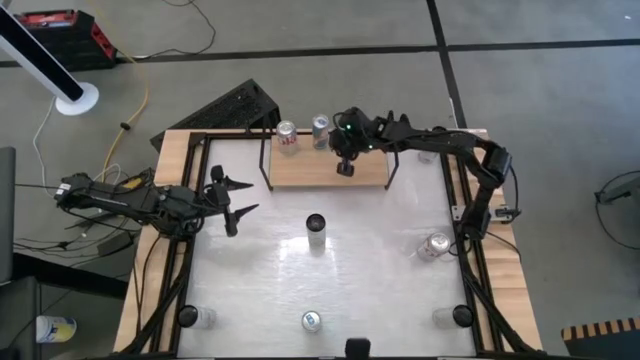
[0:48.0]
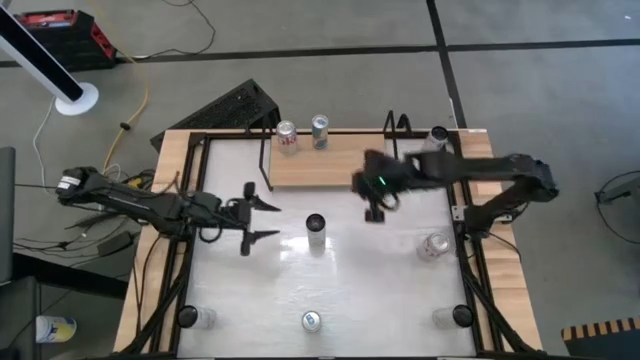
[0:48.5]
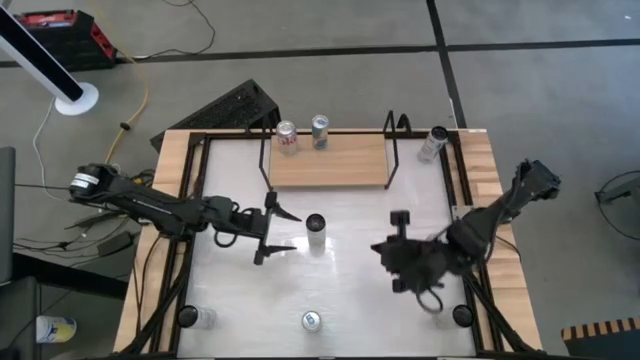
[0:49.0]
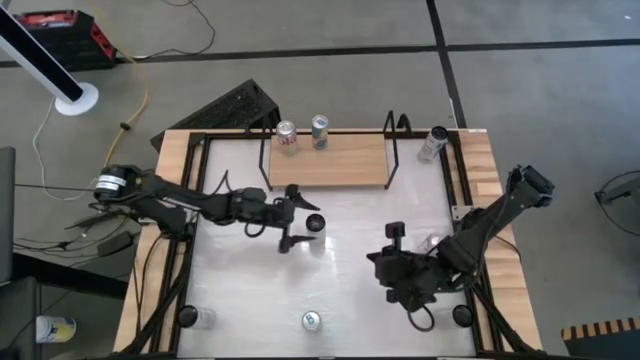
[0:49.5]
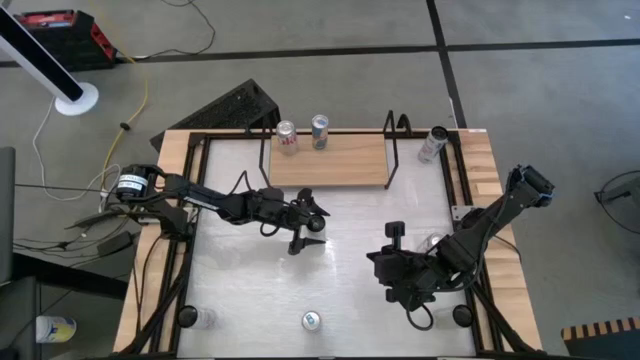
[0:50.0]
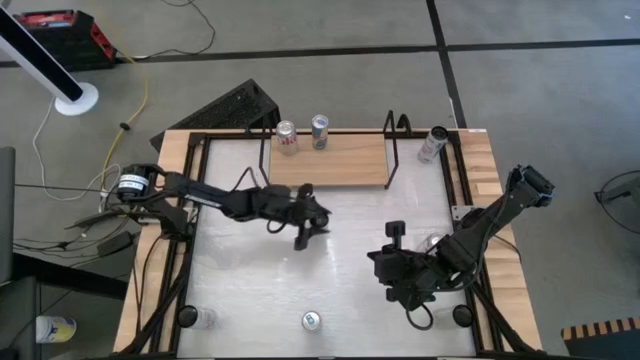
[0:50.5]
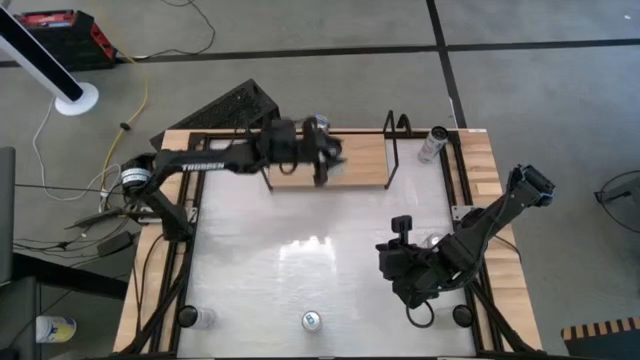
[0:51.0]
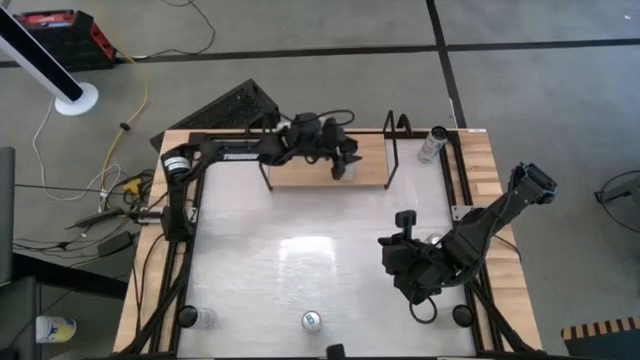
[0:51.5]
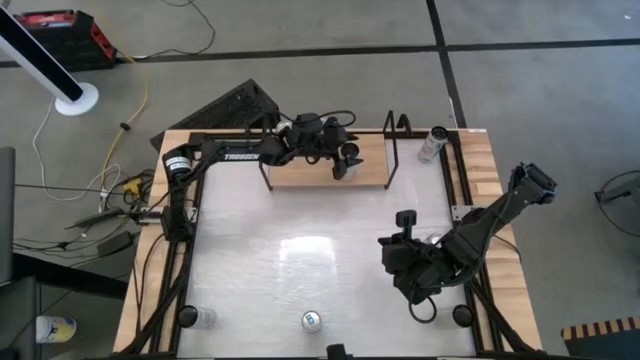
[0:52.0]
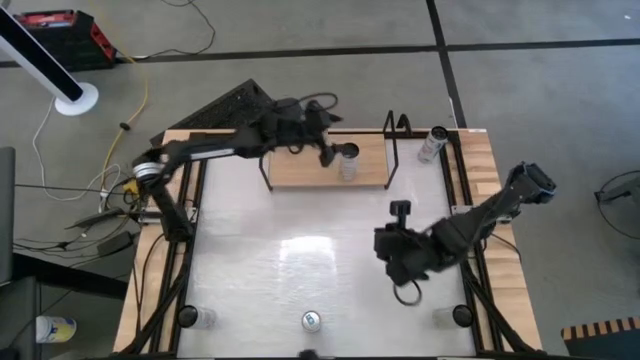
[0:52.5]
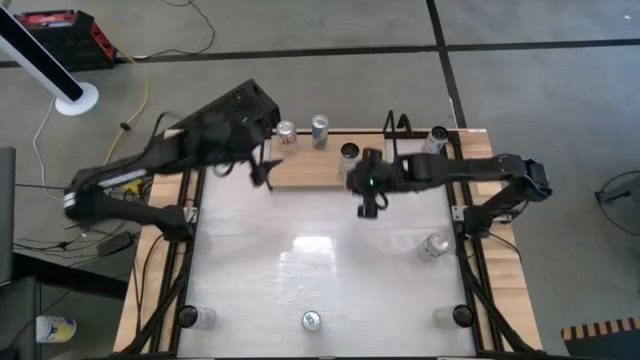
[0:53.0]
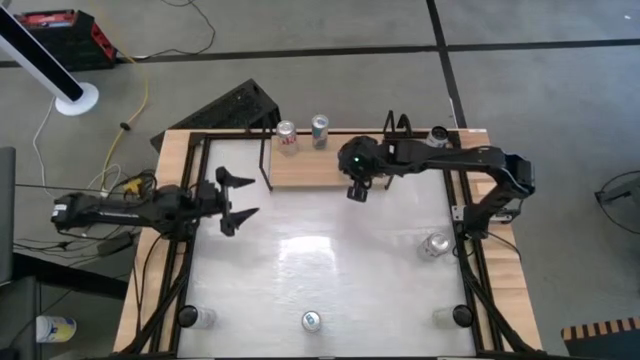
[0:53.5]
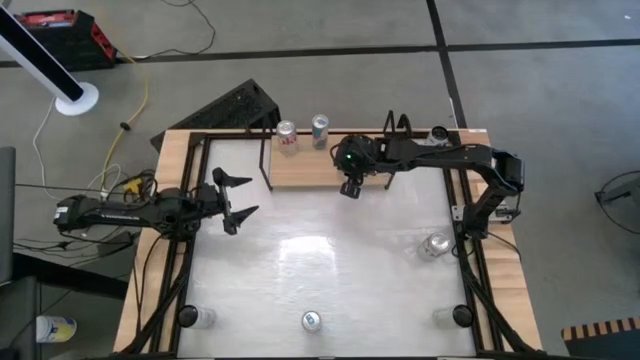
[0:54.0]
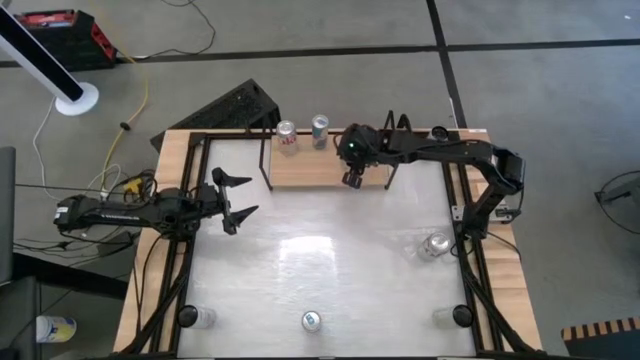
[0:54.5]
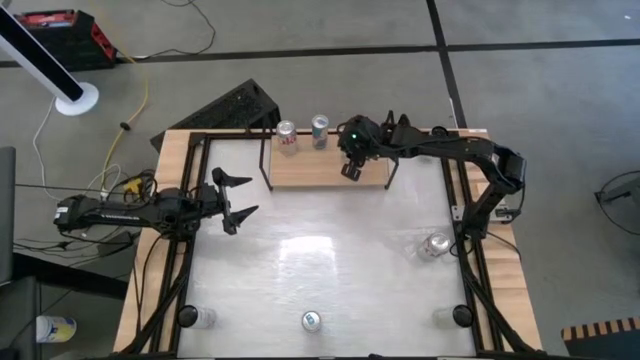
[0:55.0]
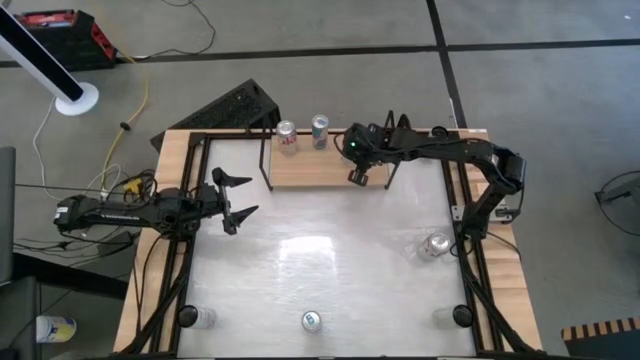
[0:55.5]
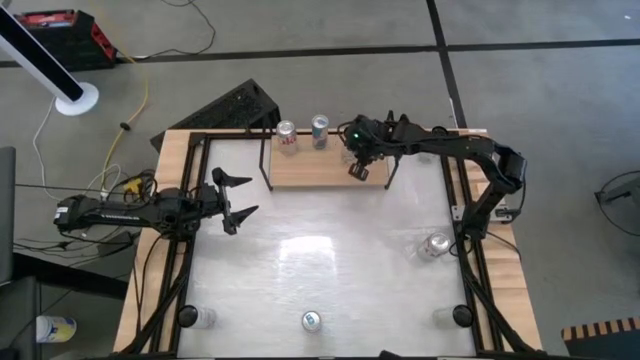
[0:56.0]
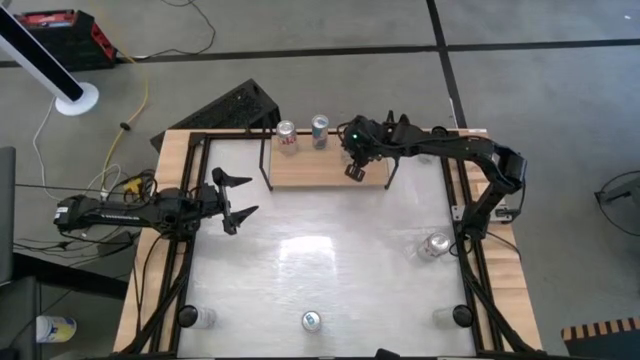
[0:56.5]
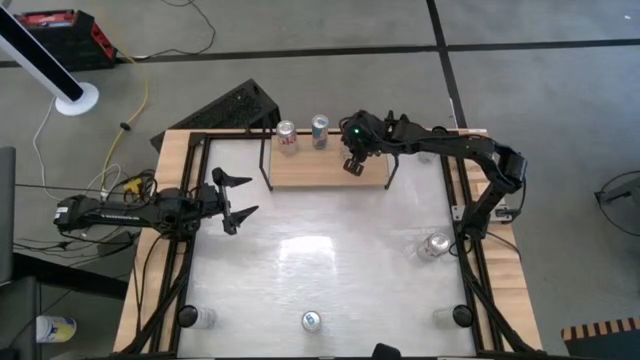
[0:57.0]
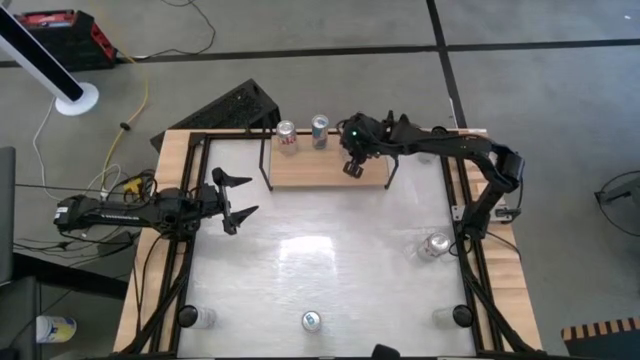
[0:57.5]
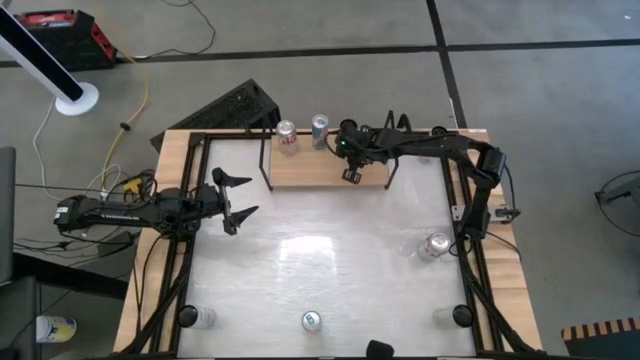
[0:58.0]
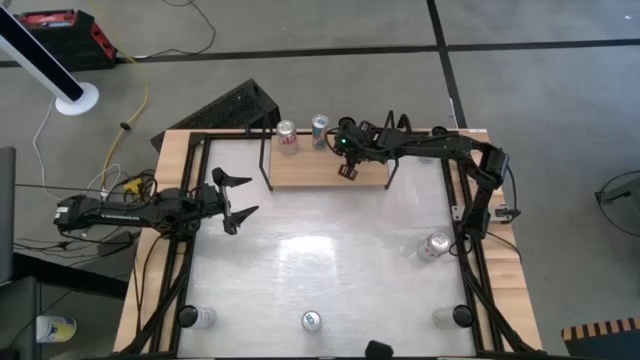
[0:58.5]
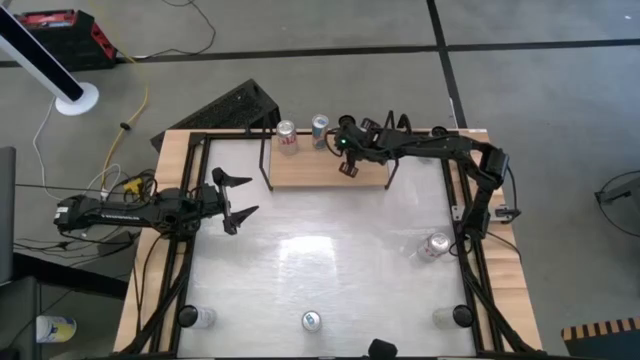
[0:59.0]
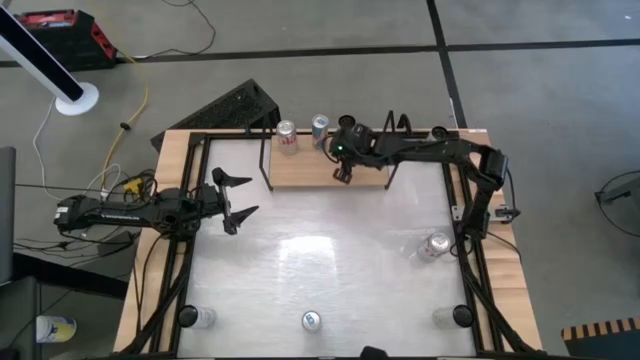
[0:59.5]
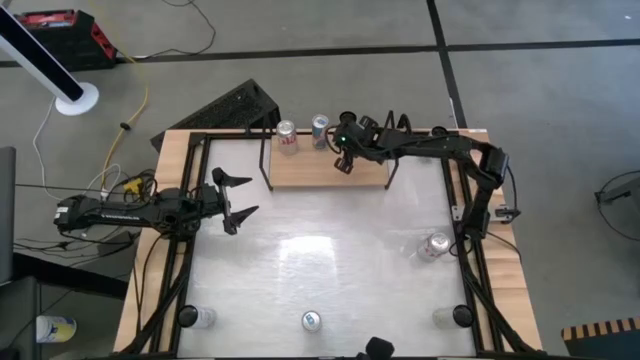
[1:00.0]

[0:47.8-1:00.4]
Task: Place canned beverage on shelf
Put the top white-yellow soda can on the shelf

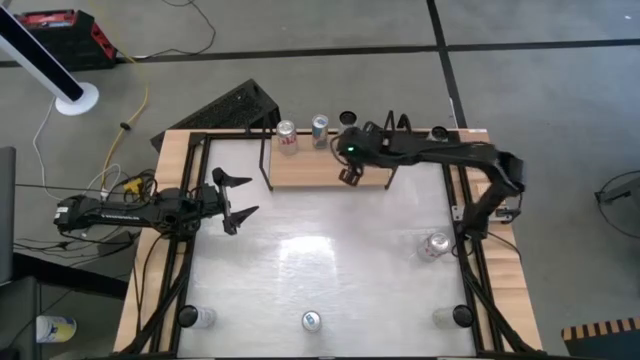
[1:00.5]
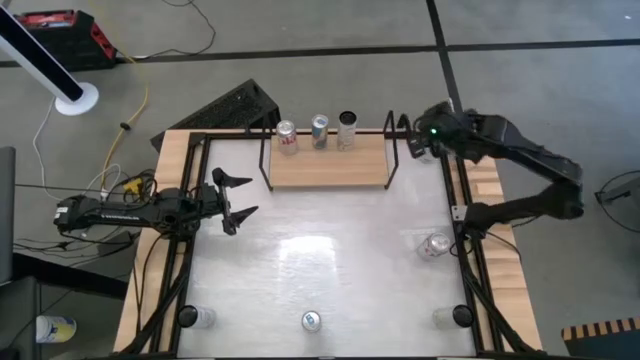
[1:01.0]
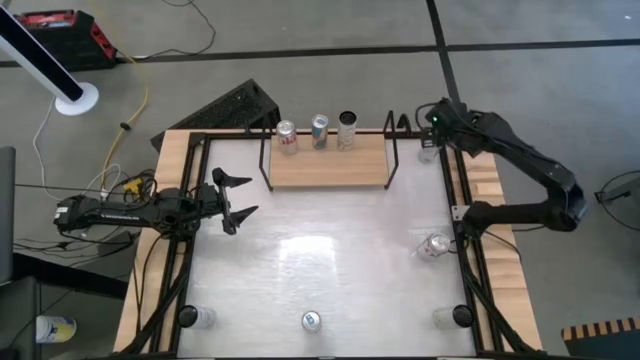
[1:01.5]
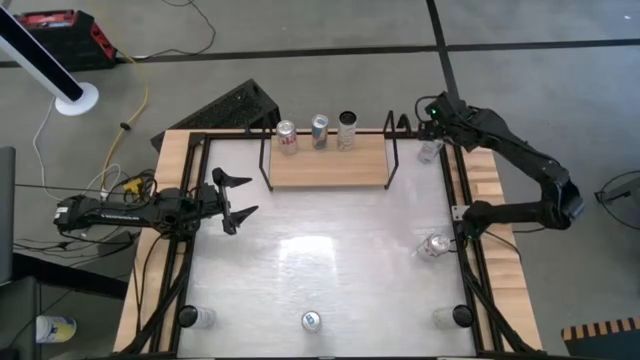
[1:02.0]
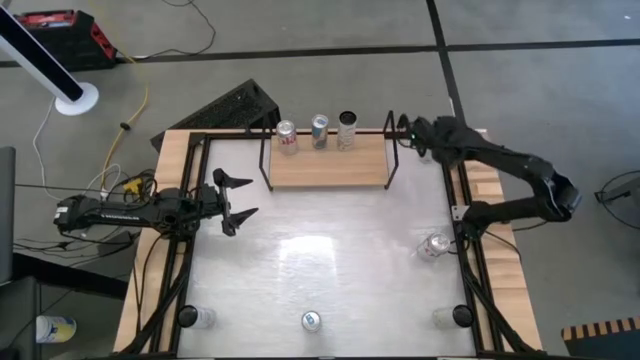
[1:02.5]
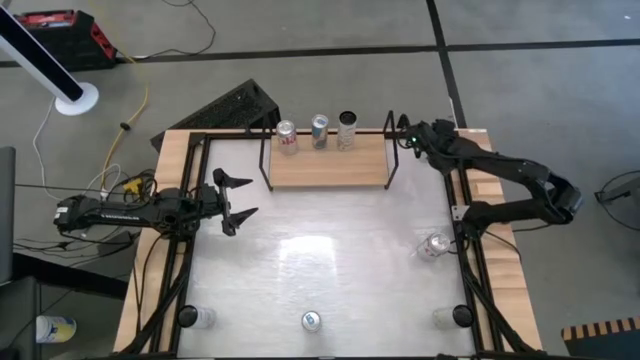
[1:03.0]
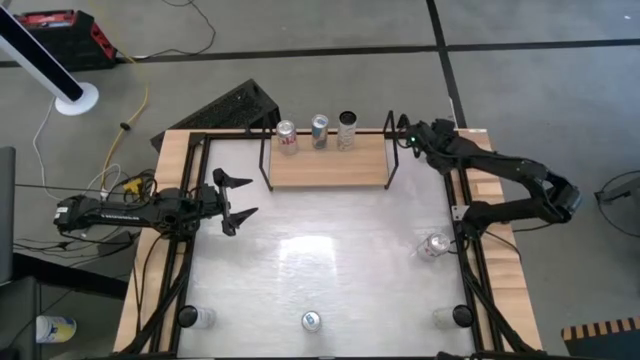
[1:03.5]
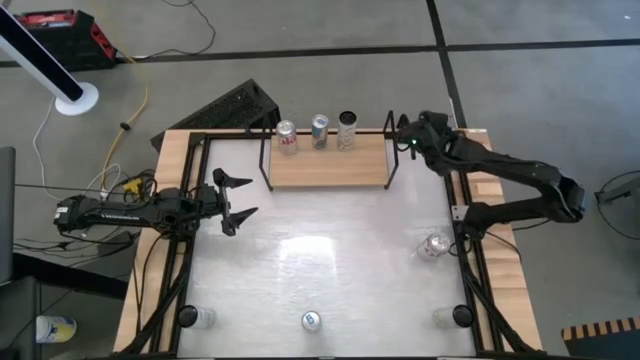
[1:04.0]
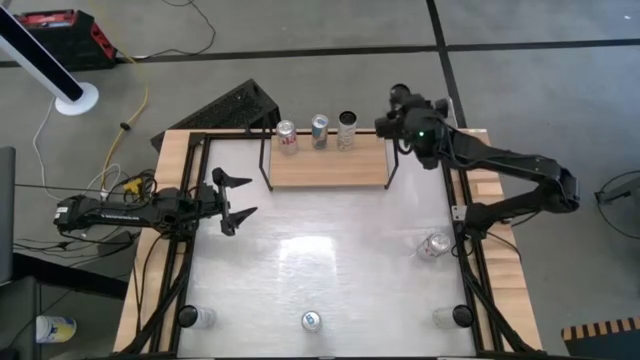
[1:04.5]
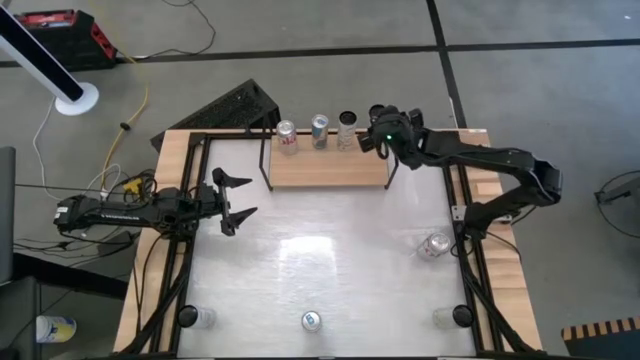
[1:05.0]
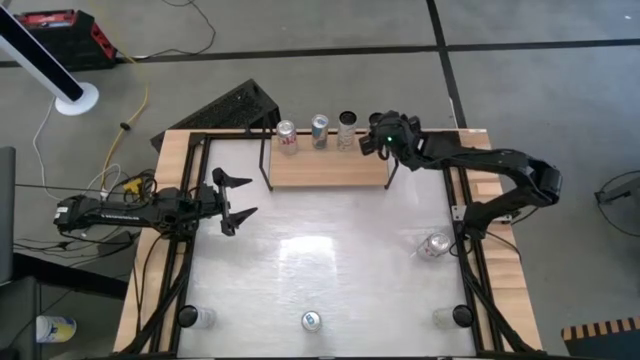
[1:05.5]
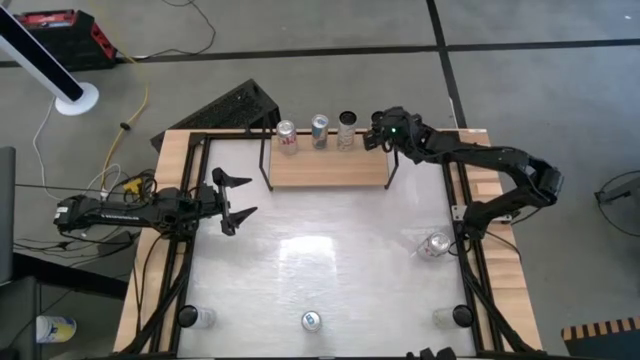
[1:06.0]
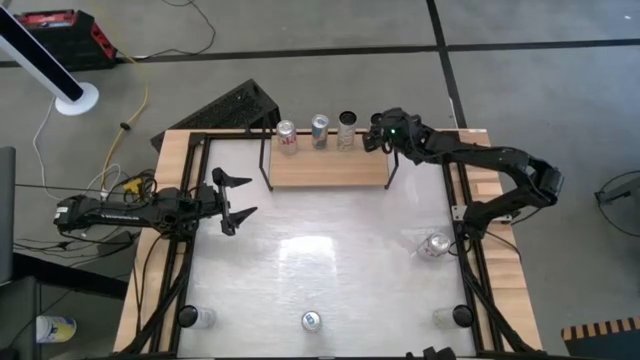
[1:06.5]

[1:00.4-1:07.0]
Put the top white-pink soda can on the shelf

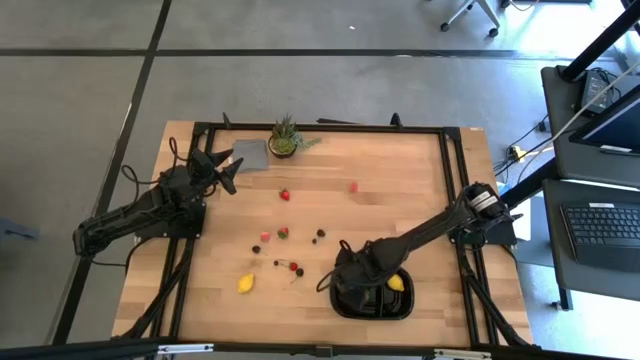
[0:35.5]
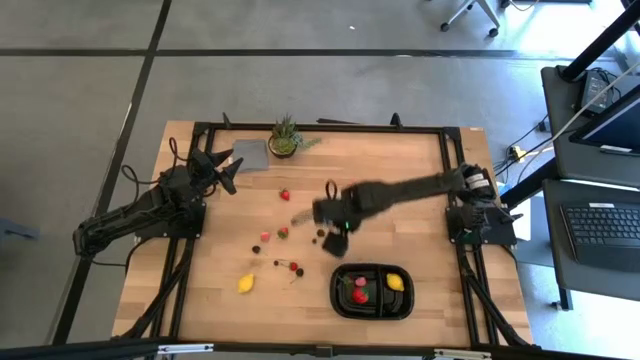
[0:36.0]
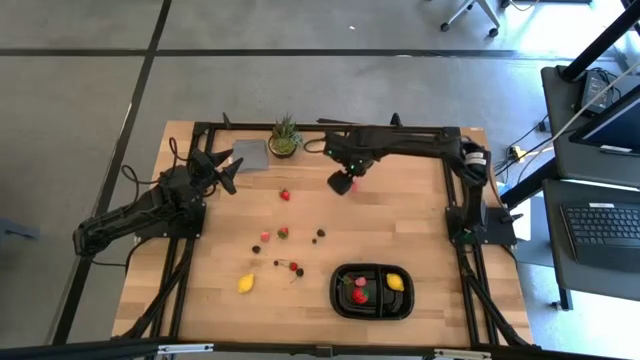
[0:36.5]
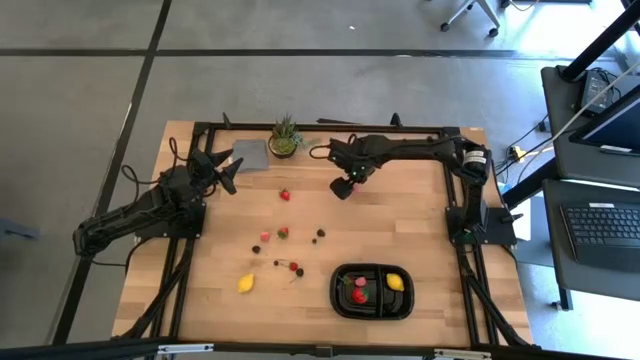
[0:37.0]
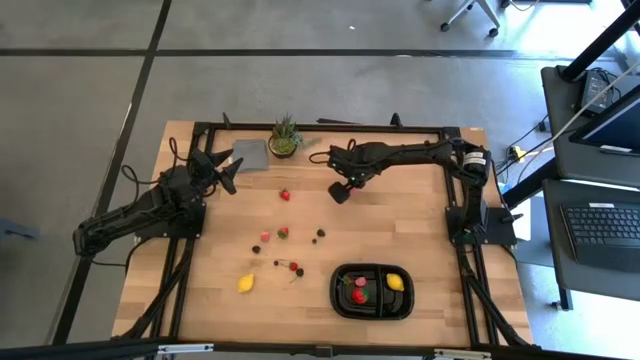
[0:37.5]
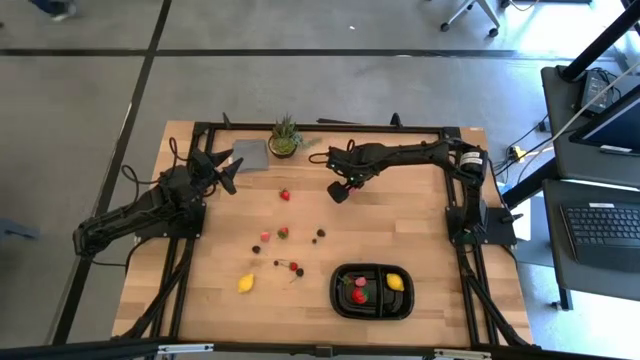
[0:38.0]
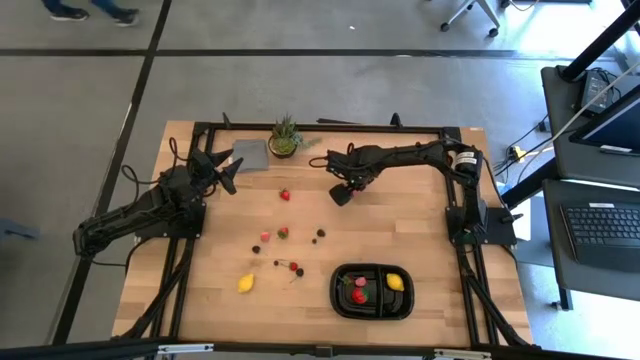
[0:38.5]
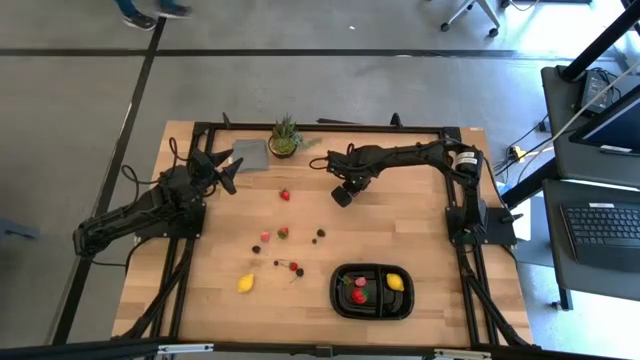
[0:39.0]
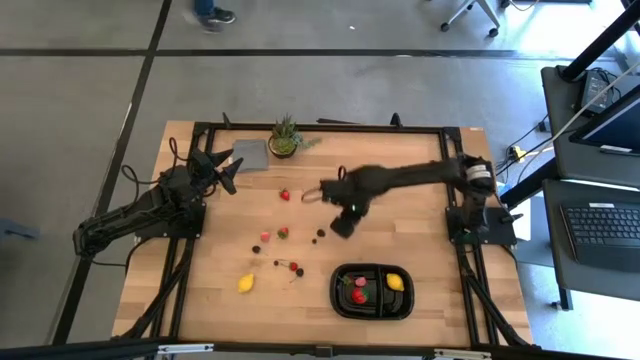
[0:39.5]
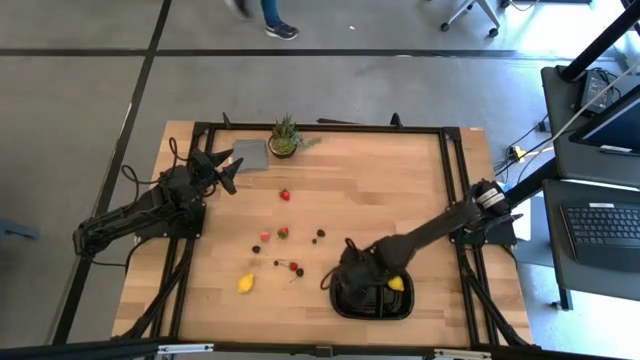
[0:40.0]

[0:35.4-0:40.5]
Task: Pick and placing Produce into tupperware
Put the pink peach into the black bin
